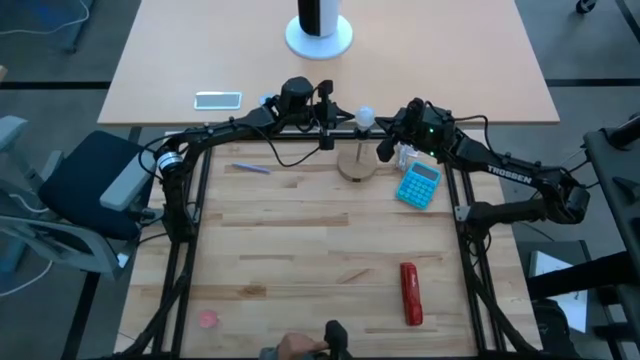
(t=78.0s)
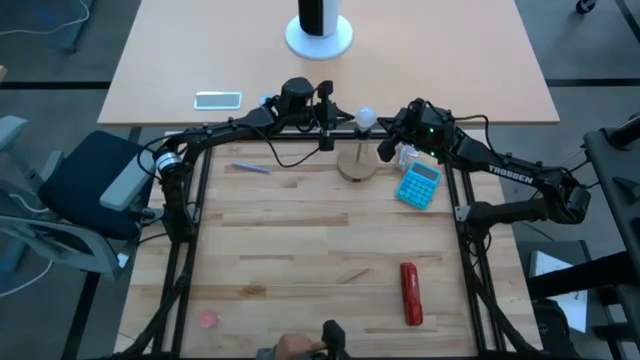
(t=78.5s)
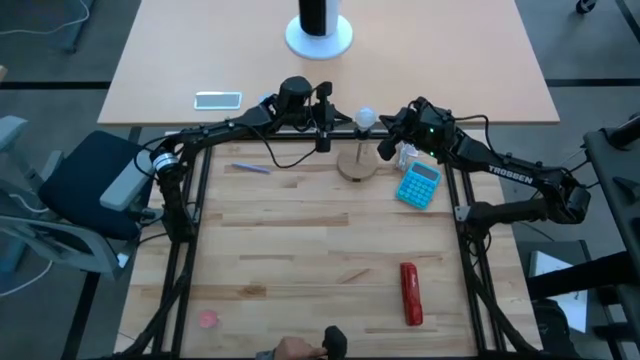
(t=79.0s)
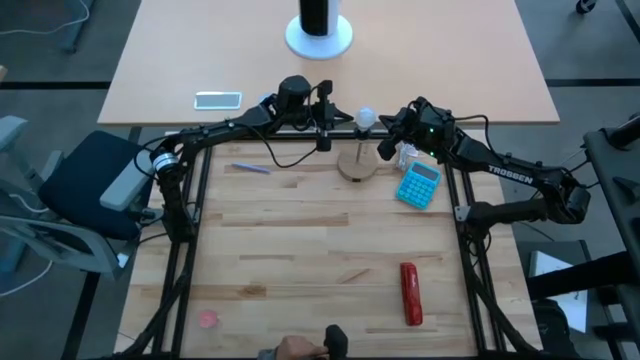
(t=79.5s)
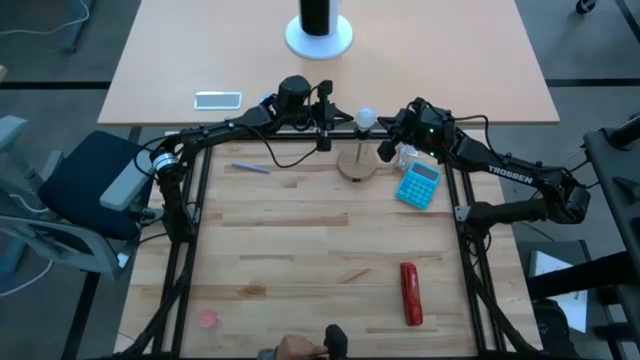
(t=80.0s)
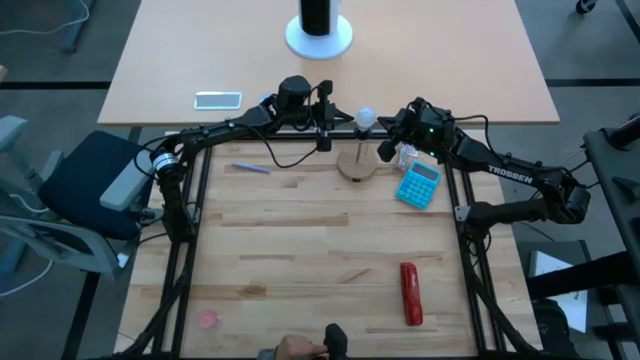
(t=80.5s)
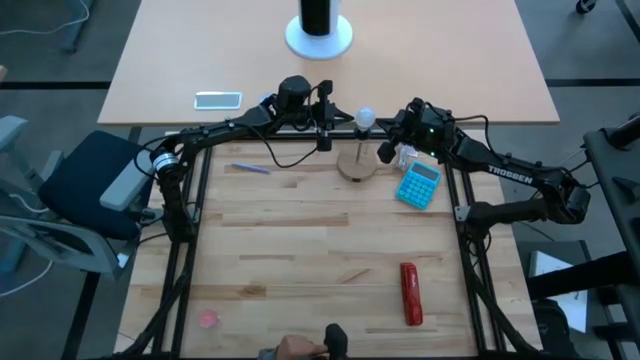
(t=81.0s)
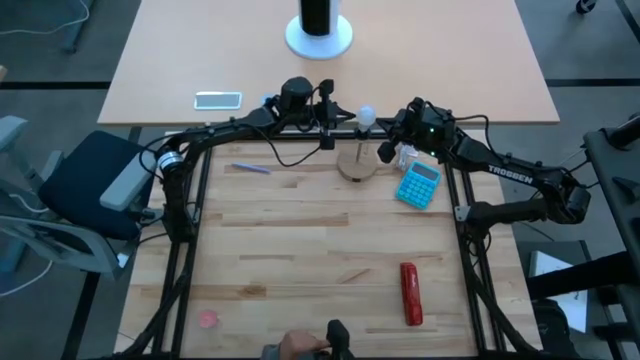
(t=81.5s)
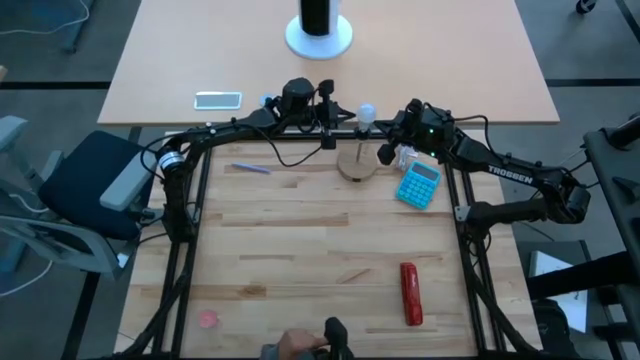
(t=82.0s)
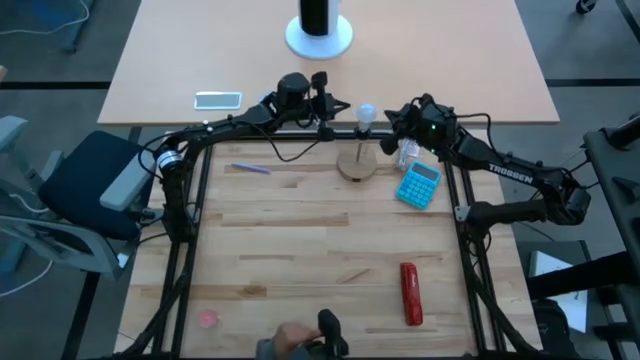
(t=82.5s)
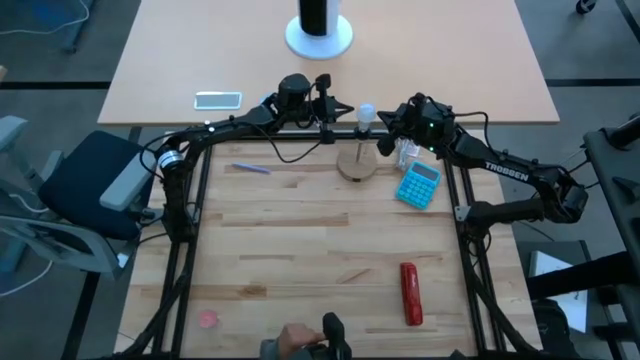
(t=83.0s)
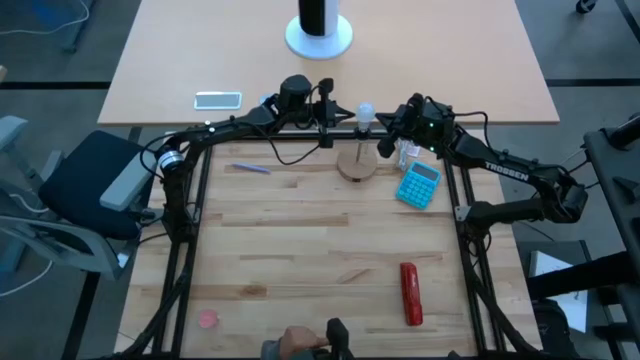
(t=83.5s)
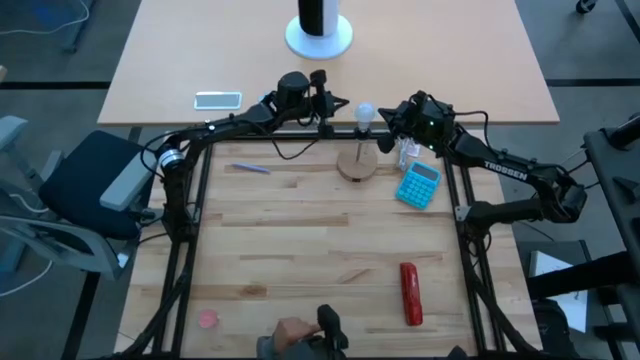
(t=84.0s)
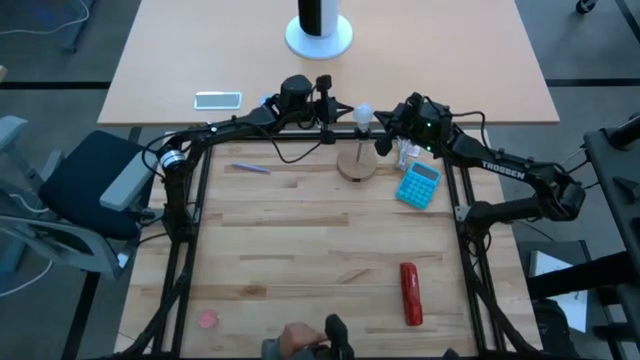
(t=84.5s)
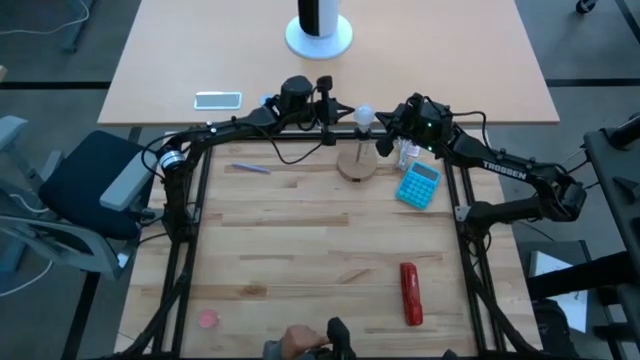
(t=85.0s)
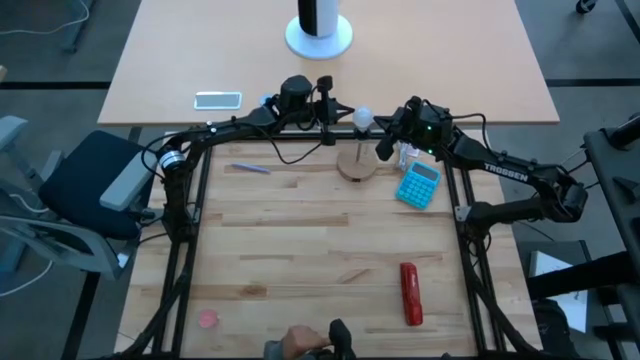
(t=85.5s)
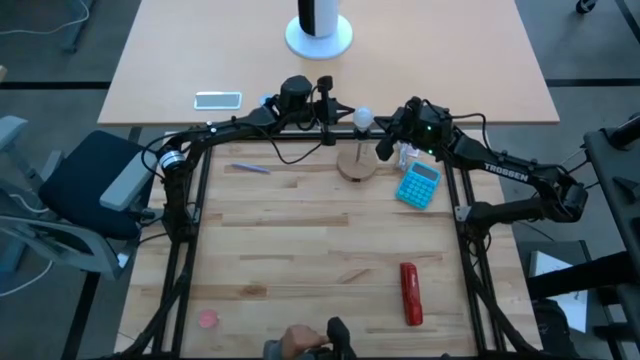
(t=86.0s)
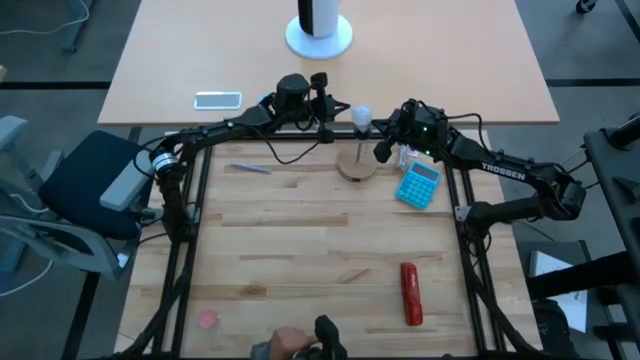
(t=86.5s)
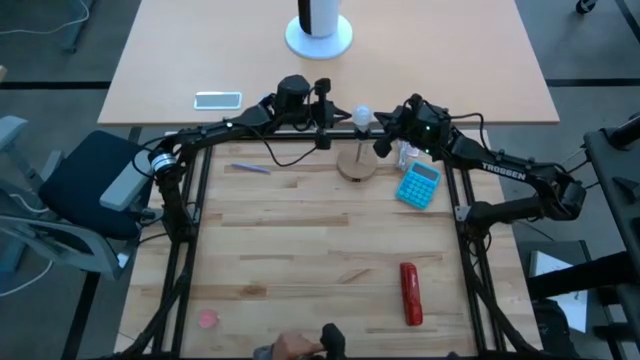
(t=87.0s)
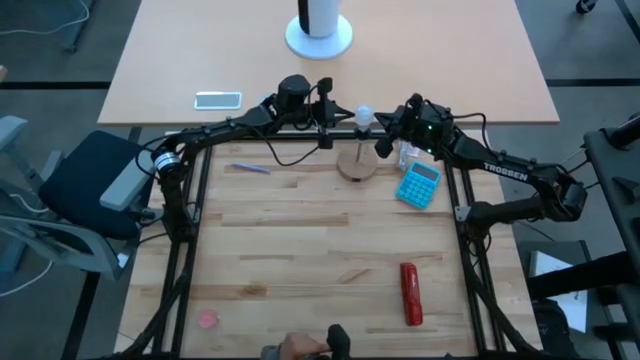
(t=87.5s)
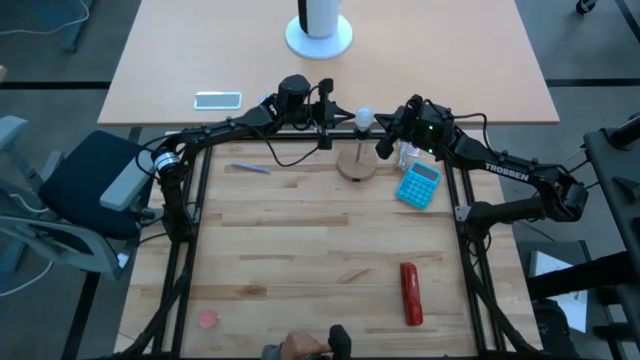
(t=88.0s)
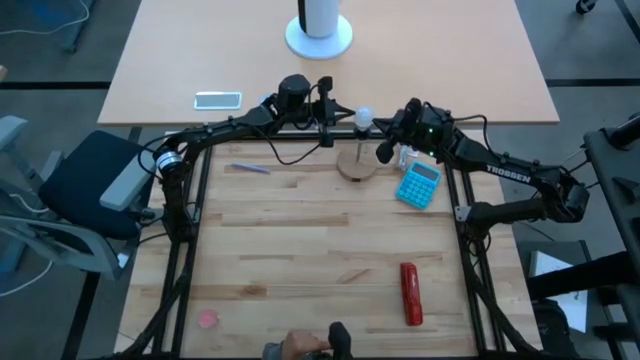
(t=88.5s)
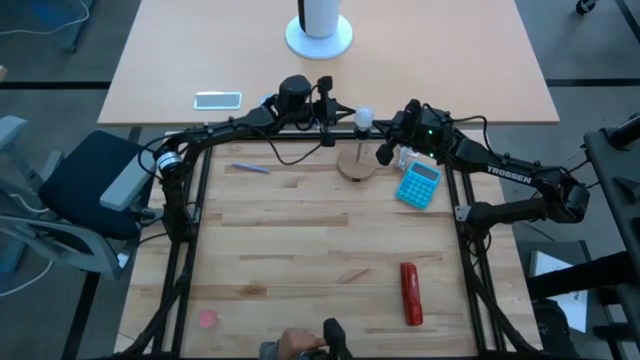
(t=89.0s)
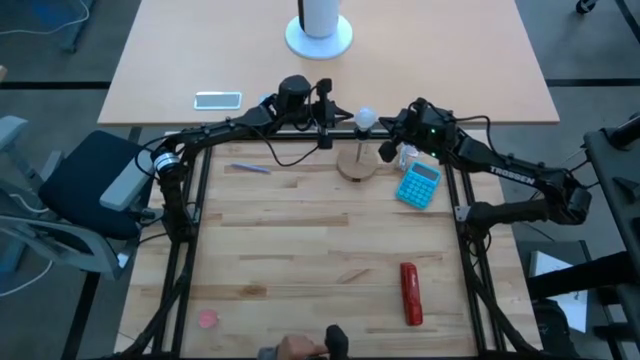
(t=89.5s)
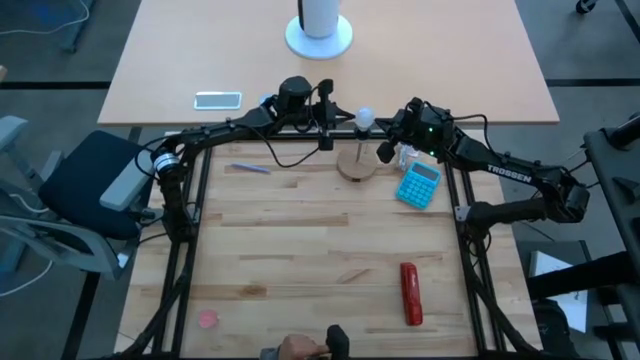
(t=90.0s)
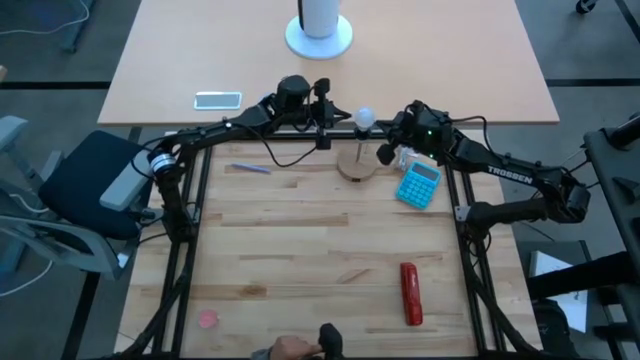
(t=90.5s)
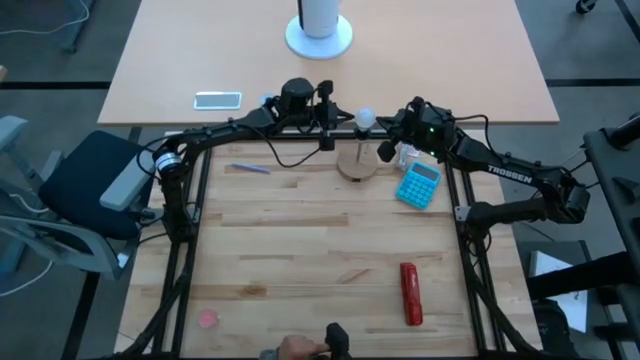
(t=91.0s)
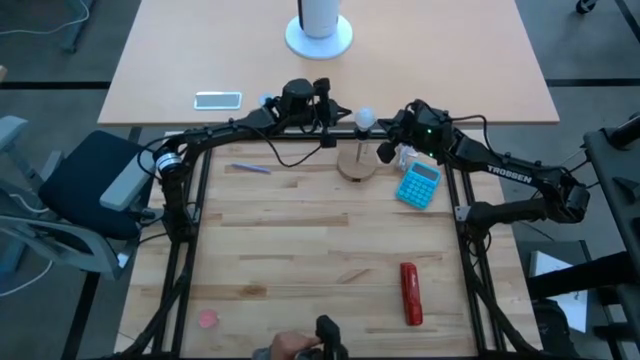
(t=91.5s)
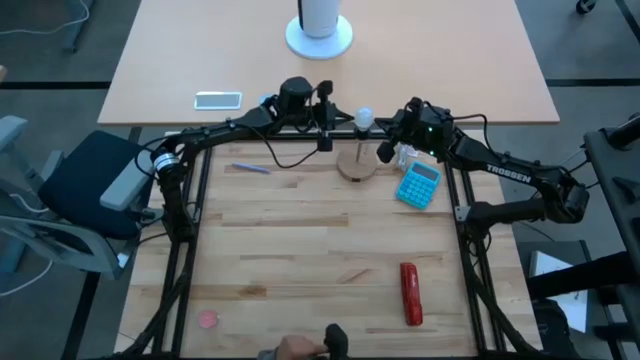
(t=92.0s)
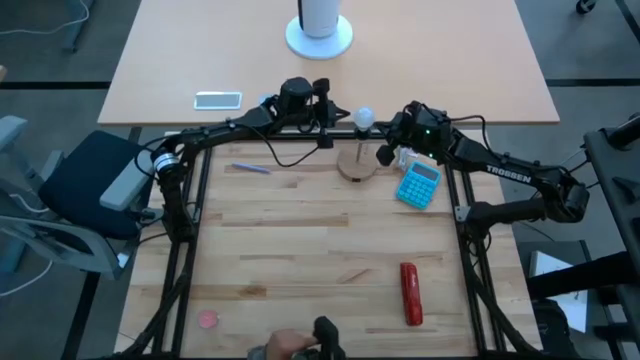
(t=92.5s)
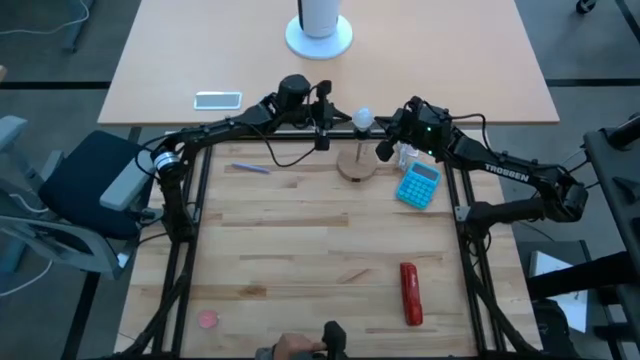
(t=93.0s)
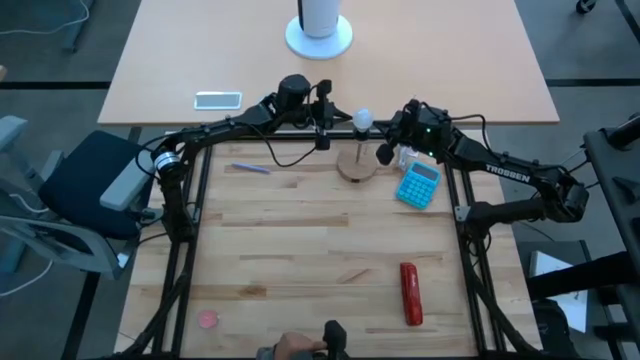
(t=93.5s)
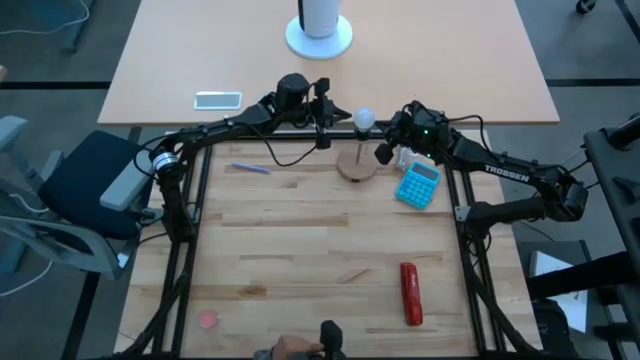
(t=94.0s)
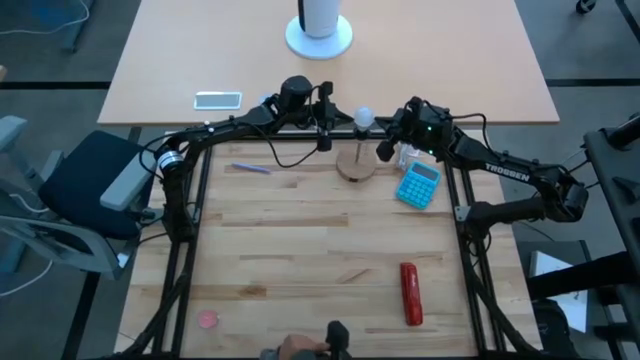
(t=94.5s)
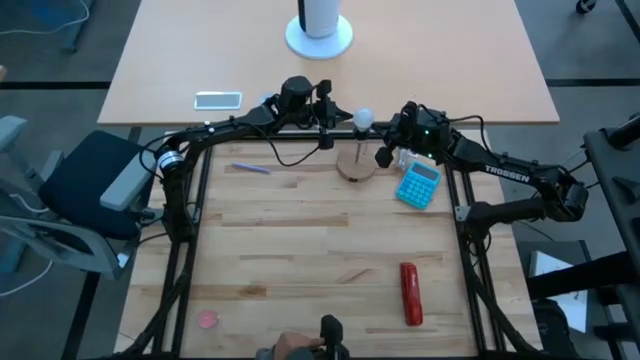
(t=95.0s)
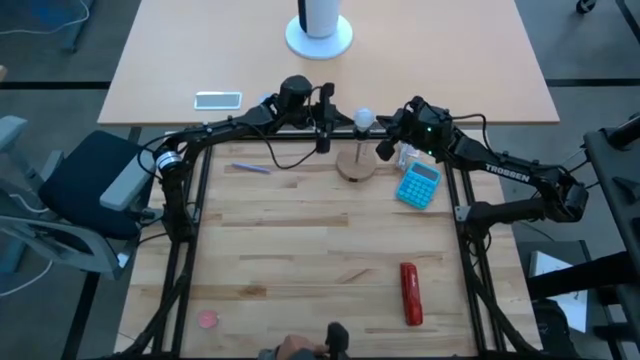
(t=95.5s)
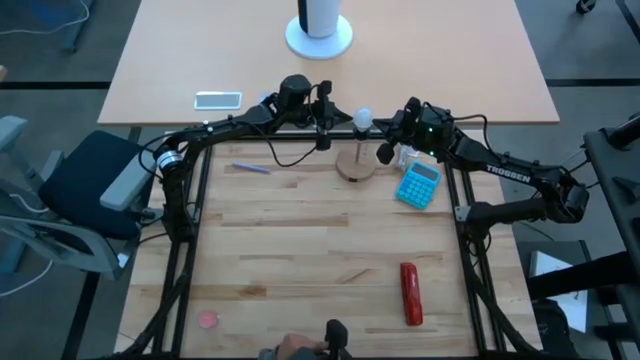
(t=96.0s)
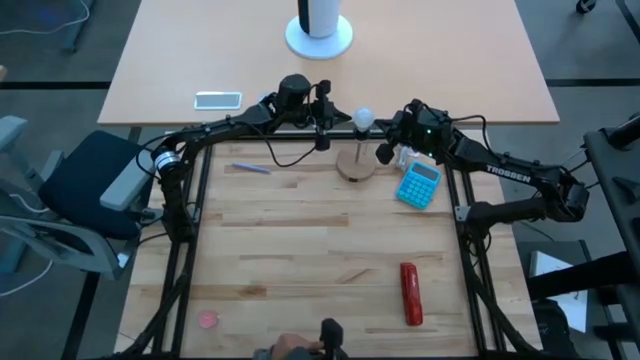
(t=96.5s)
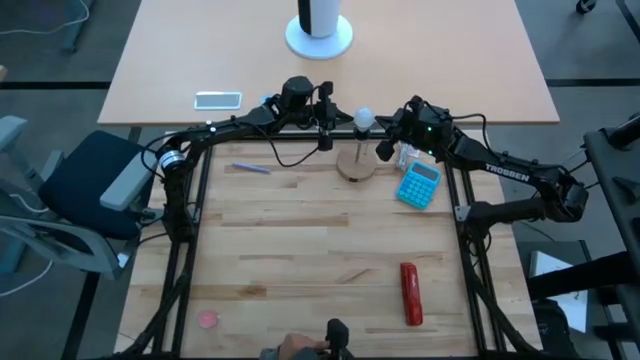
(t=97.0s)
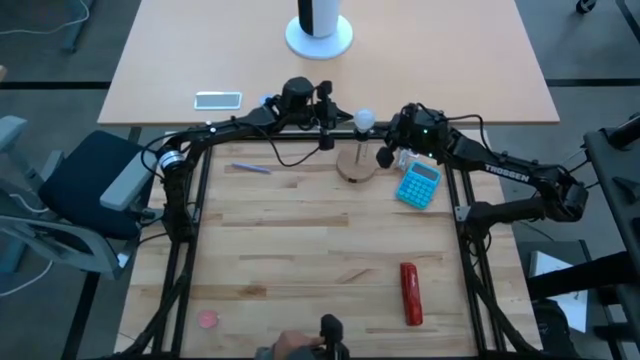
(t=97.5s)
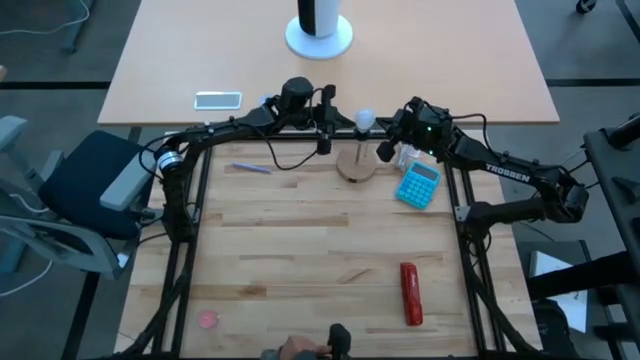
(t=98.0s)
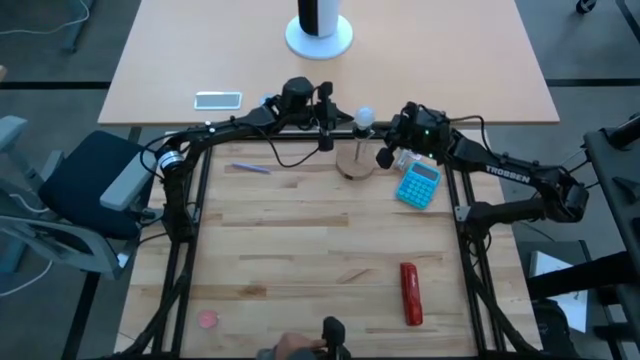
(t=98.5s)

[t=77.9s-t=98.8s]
Task: Screw lightbulb
Insert the lightbulb into the lamp

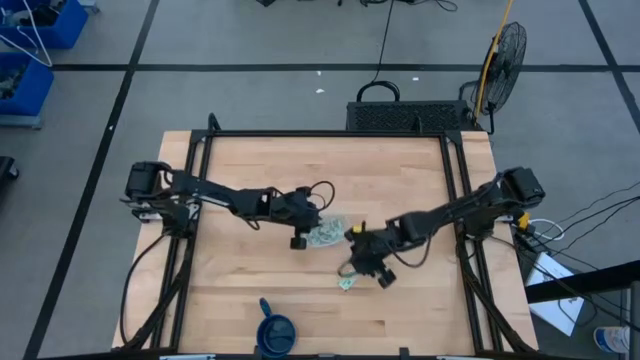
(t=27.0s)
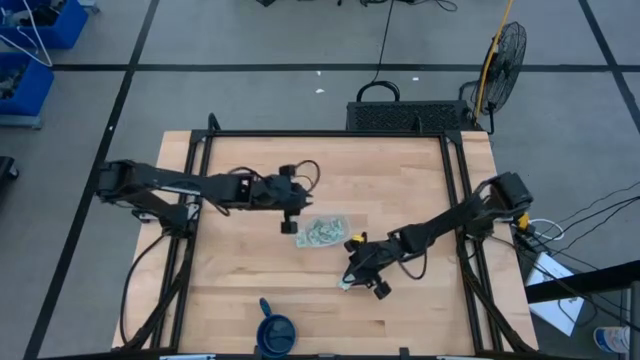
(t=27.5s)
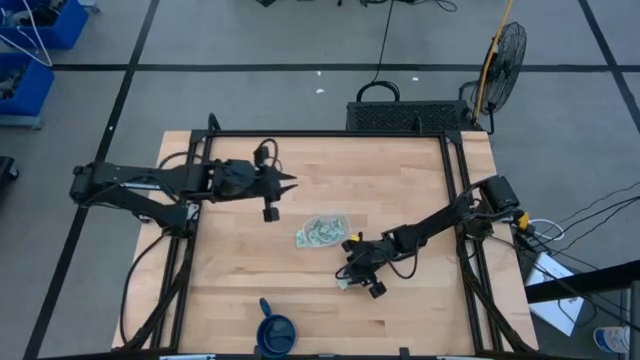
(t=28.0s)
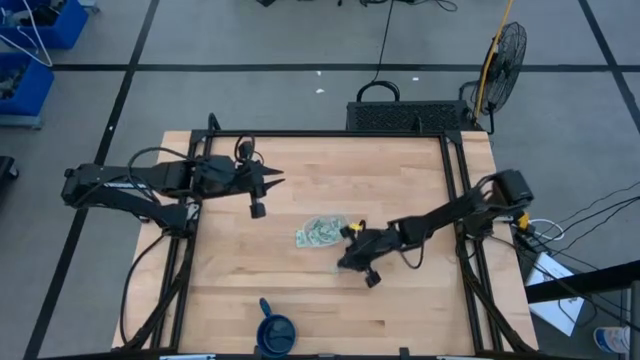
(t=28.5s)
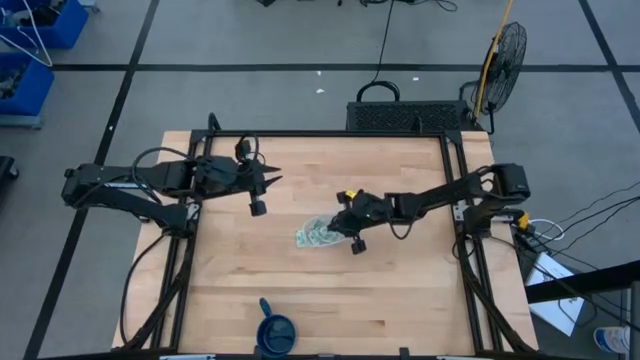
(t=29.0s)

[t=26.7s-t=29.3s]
Task: Pick and place Stevia / Truvia into bins
Put the stevia packet into the transparent container
